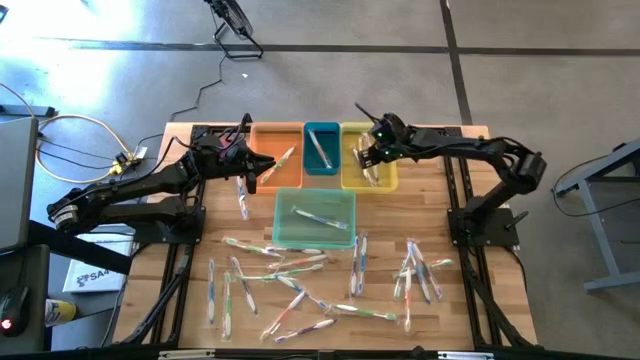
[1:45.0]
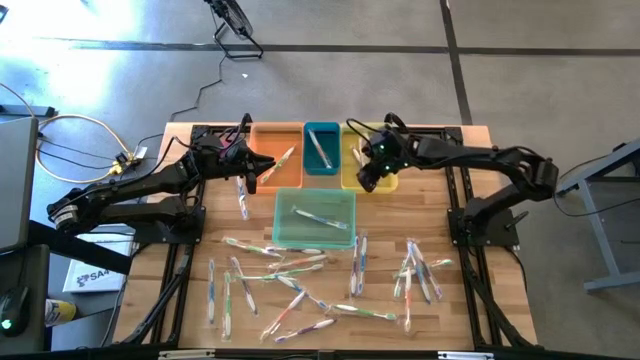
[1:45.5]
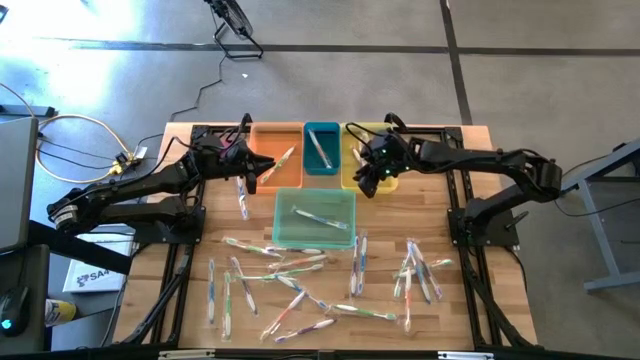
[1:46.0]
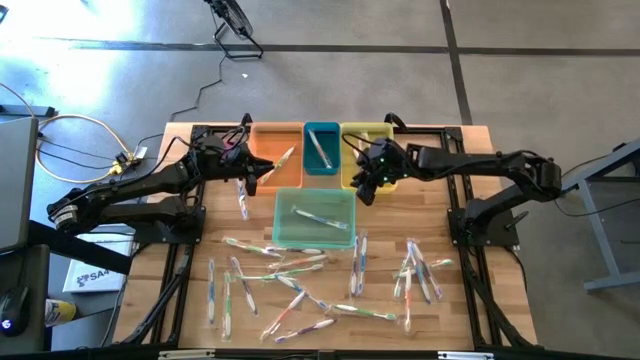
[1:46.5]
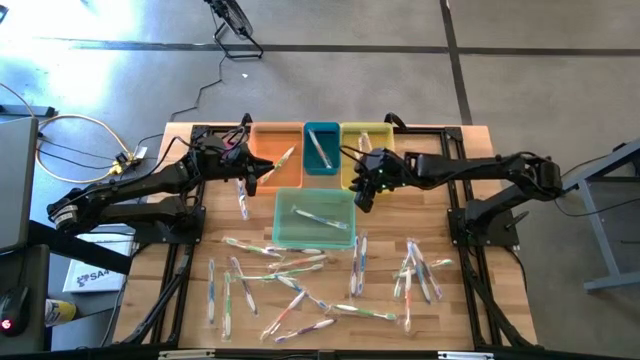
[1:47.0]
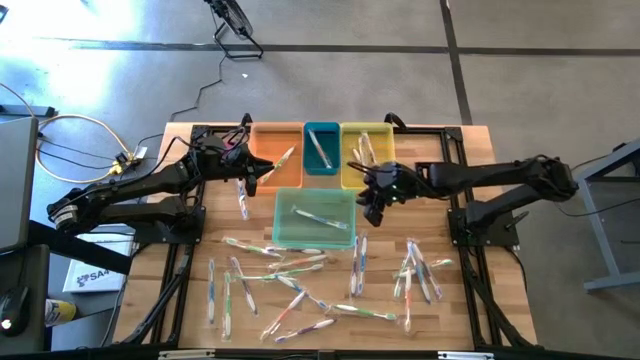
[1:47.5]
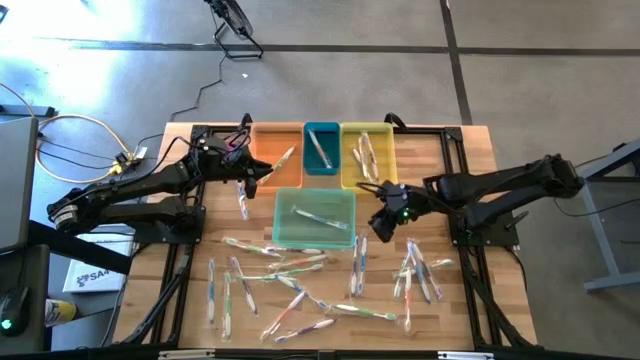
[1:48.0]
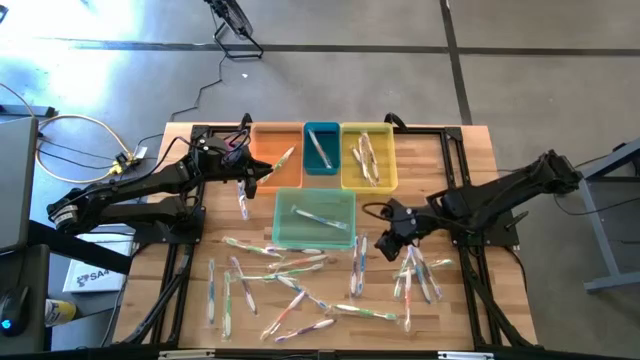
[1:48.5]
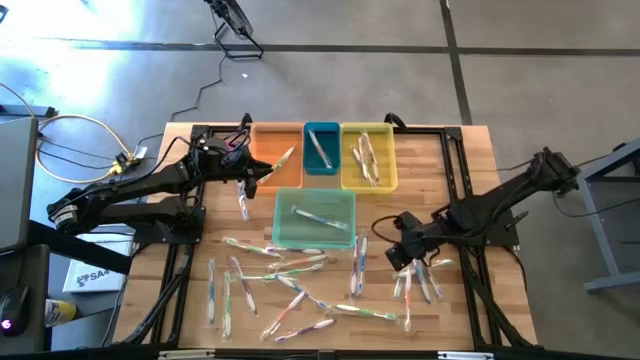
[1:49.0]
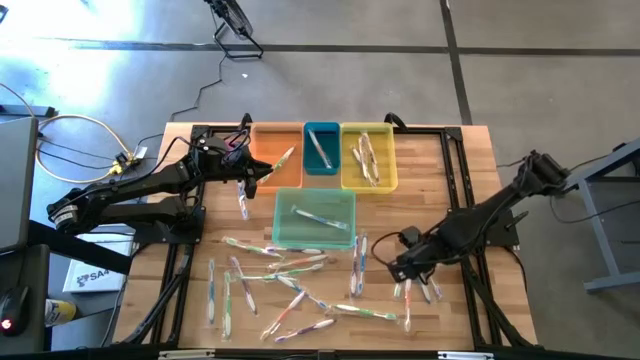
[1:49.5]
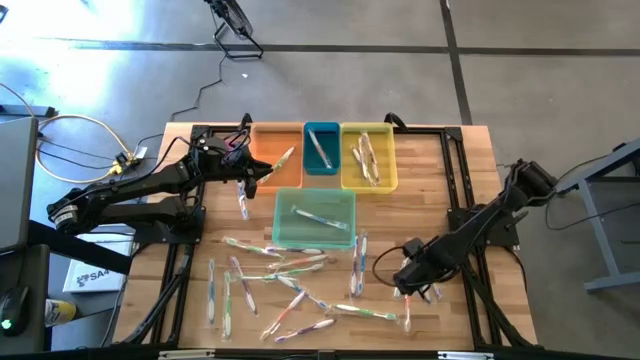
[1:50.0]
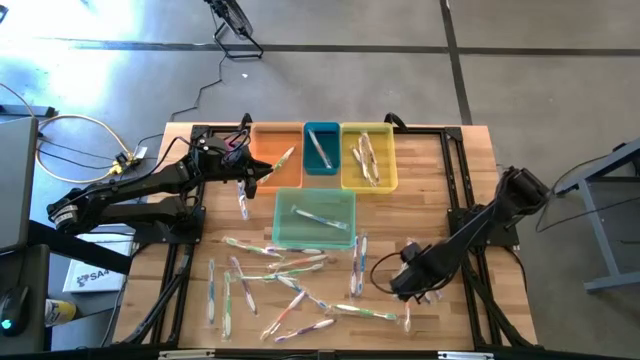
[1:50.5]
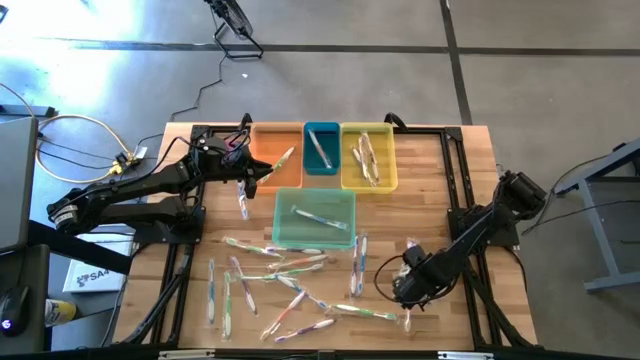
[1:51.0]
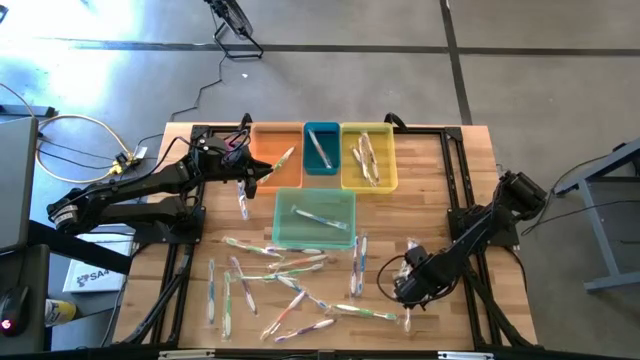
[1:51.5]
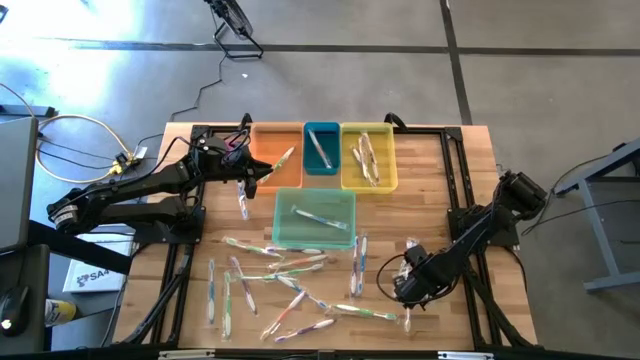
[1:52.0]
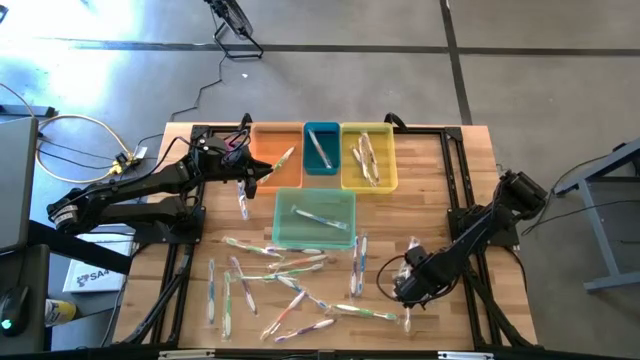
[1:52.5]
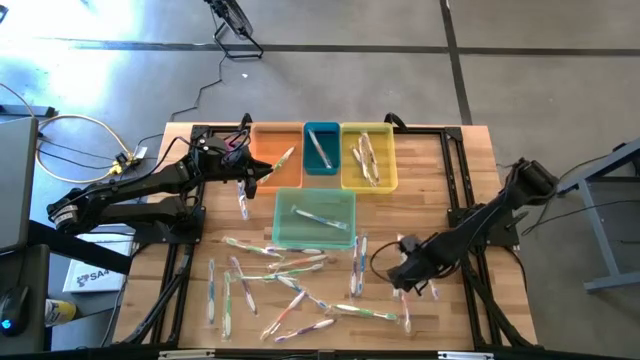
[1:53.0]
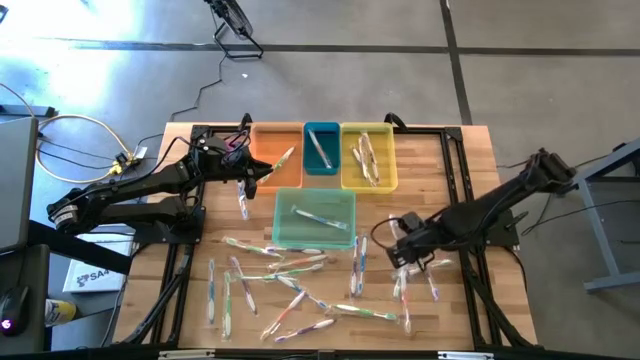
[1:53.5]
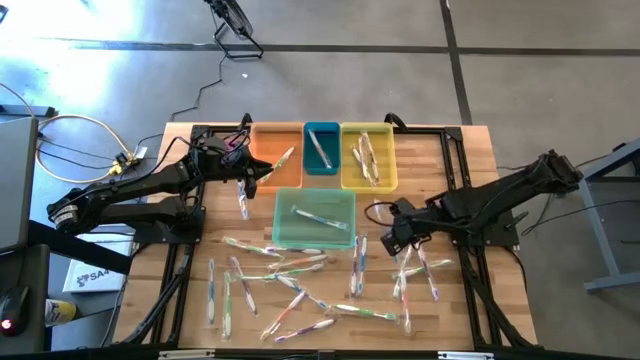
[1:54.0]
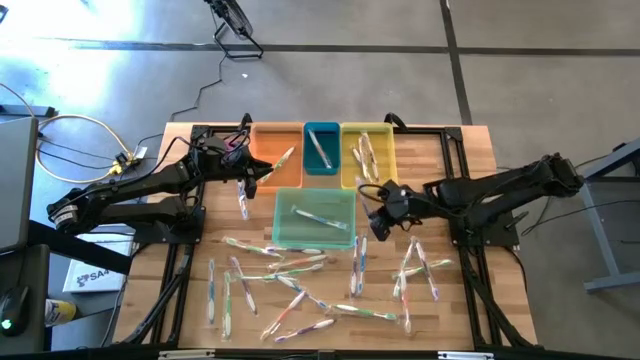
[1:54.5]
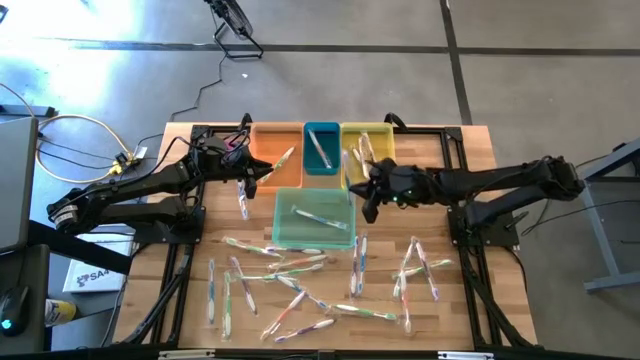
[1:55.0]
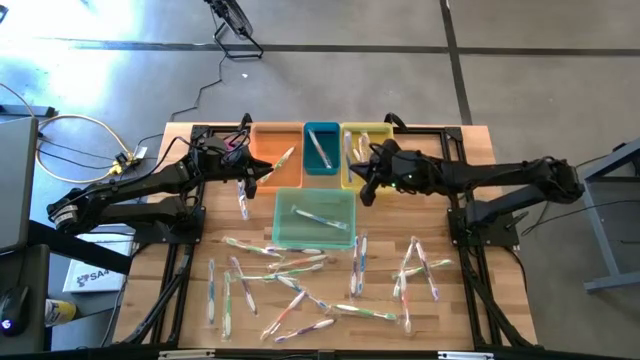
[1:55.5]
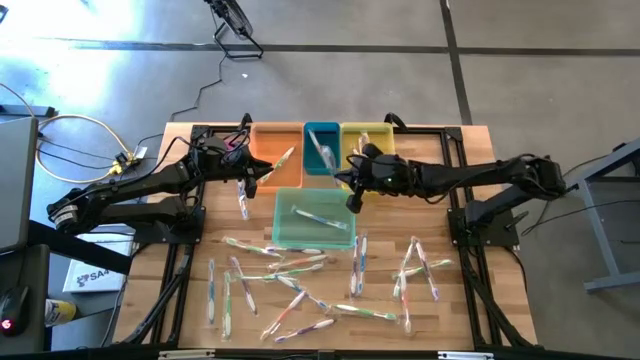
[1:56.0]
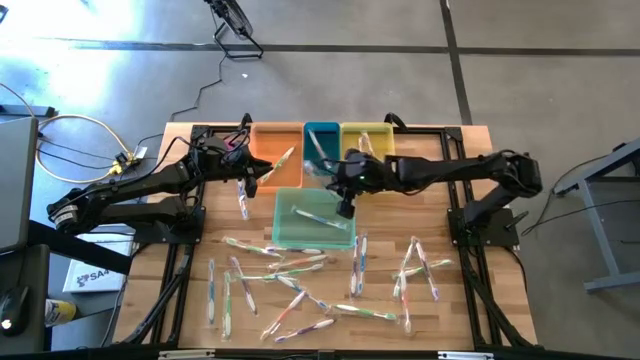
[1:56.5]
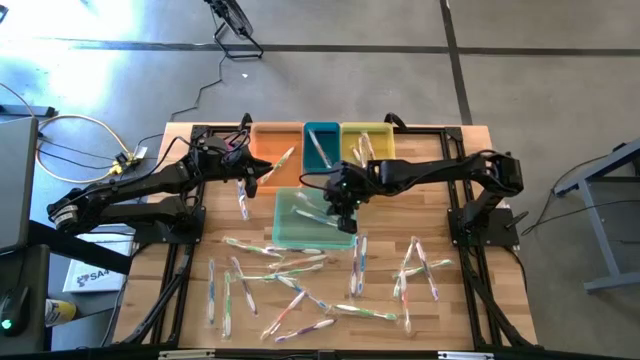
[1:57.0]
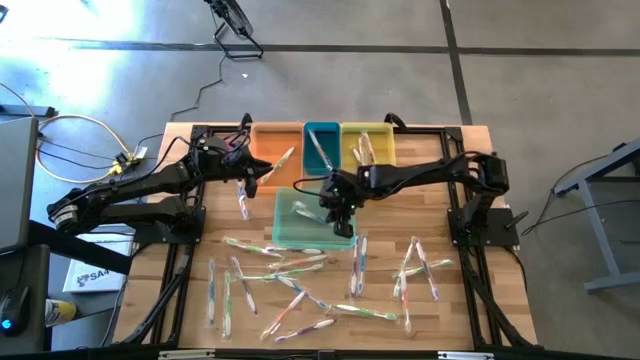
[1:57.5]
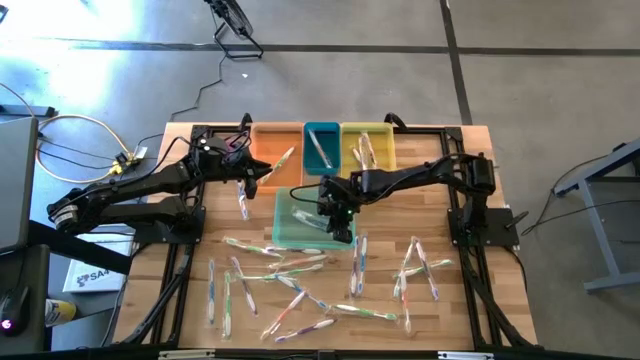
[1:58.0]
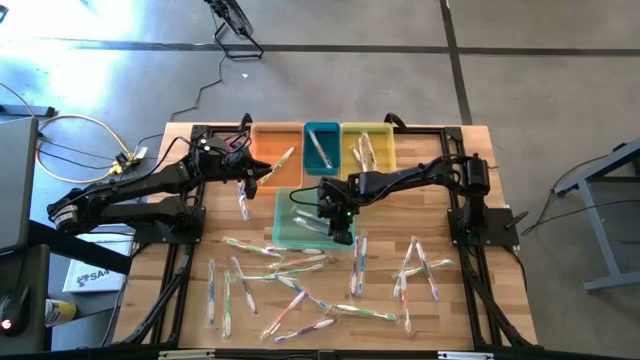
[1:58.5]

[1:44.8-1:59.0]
Task: Pick & Place Toothbrushes
Put the blue toothbrush into the green bin
